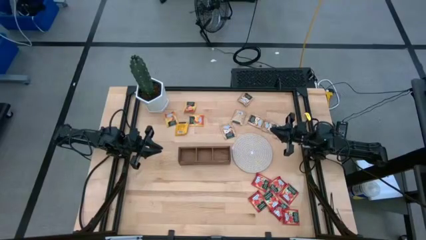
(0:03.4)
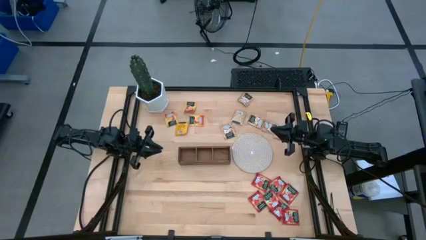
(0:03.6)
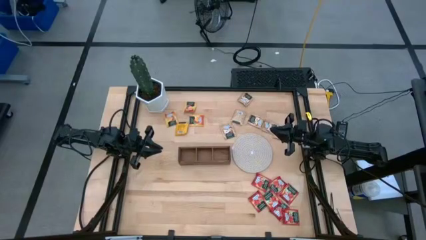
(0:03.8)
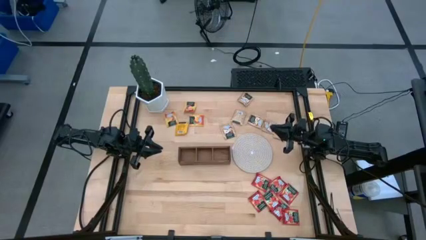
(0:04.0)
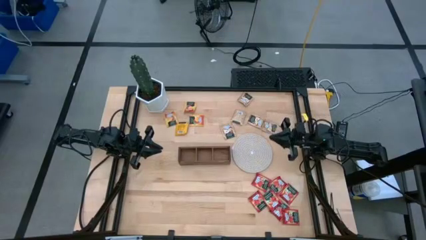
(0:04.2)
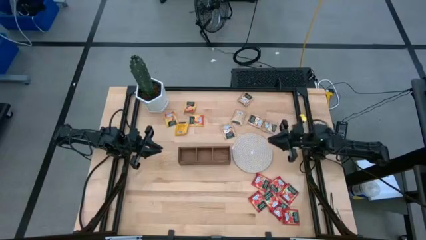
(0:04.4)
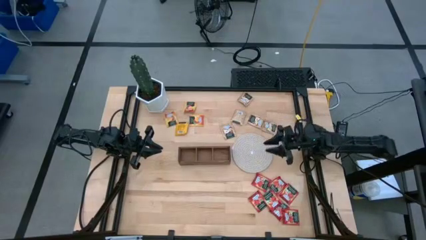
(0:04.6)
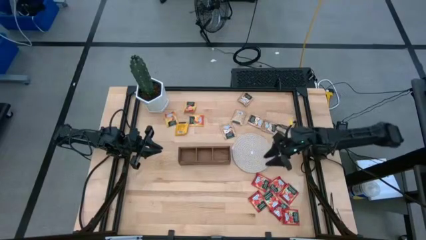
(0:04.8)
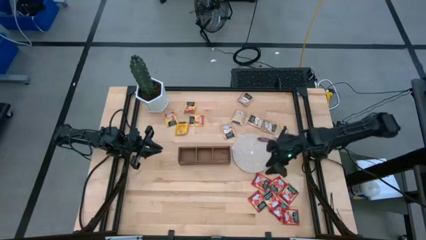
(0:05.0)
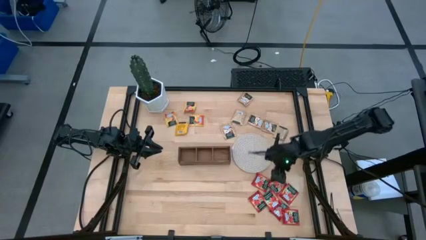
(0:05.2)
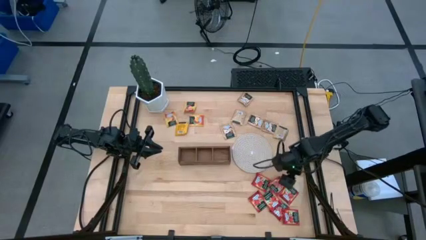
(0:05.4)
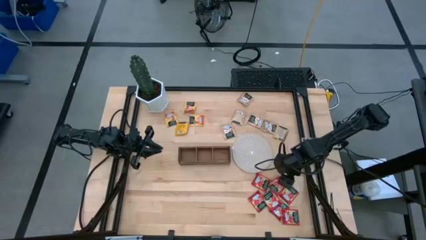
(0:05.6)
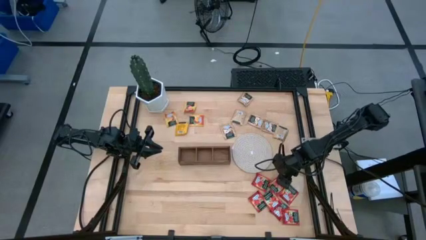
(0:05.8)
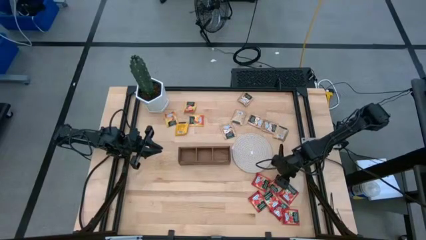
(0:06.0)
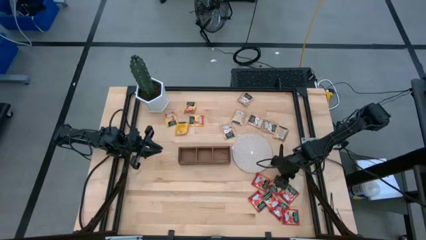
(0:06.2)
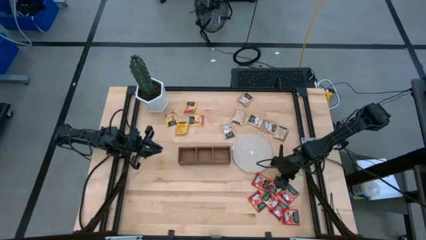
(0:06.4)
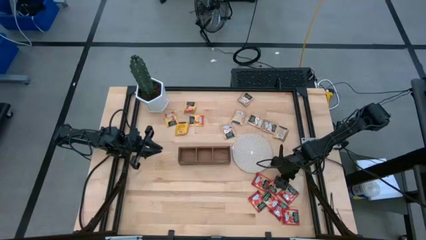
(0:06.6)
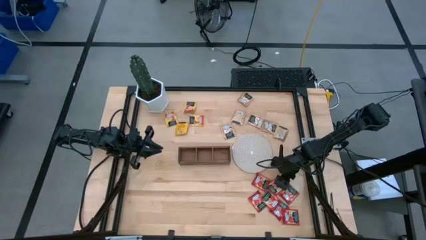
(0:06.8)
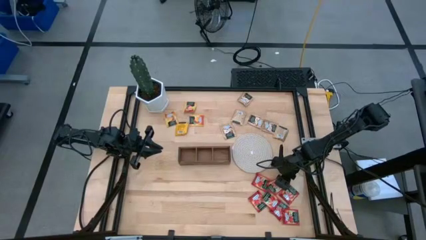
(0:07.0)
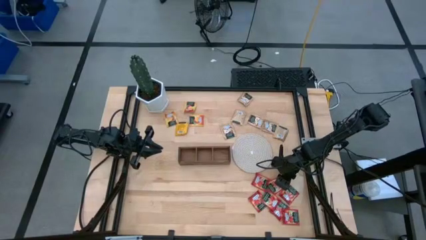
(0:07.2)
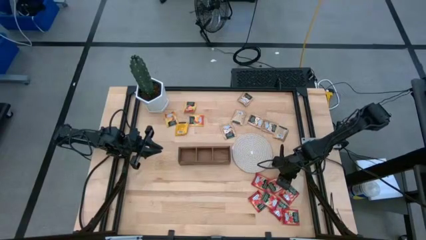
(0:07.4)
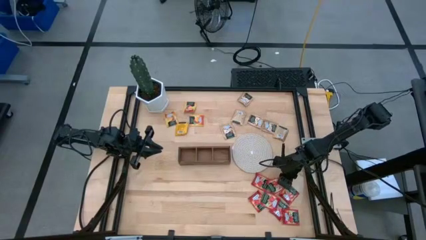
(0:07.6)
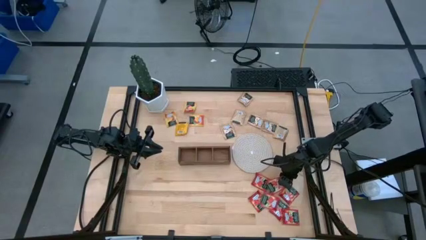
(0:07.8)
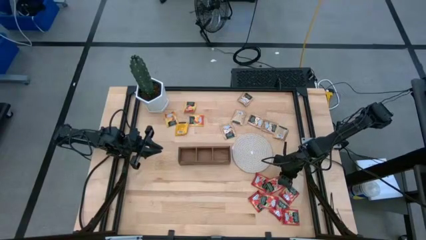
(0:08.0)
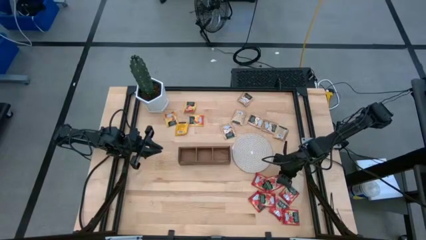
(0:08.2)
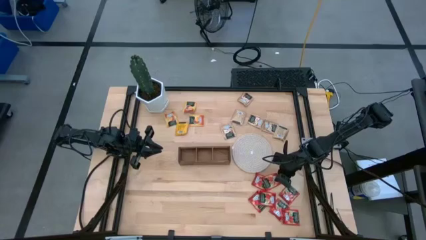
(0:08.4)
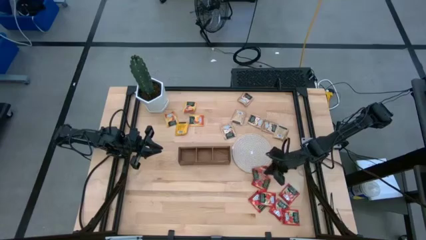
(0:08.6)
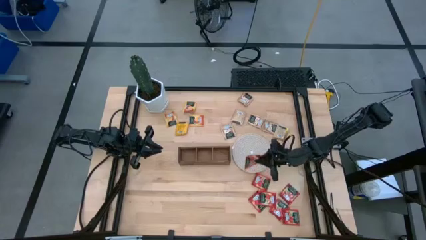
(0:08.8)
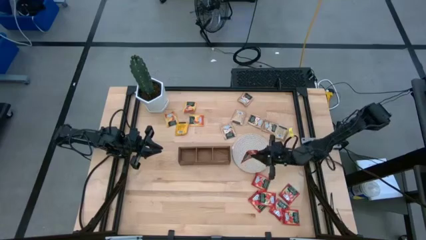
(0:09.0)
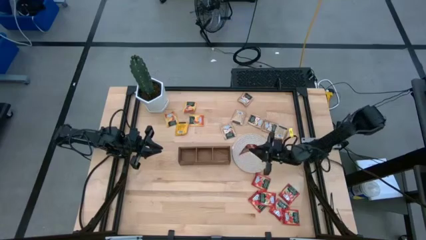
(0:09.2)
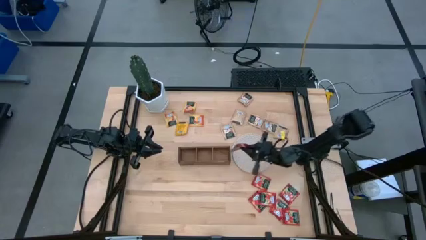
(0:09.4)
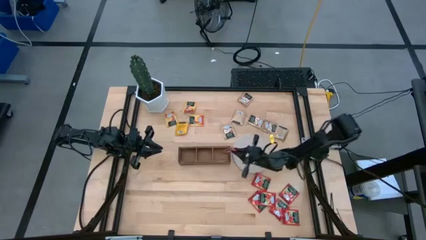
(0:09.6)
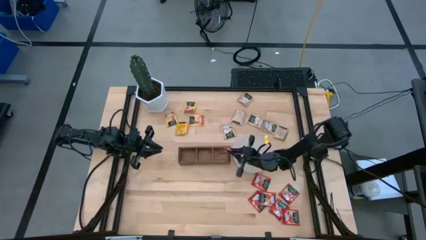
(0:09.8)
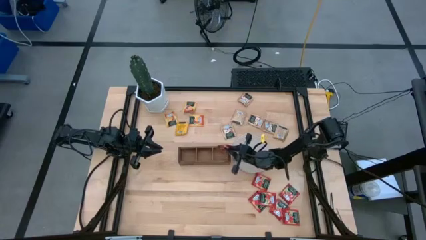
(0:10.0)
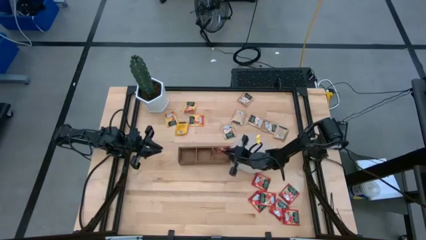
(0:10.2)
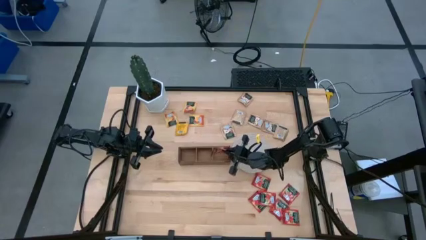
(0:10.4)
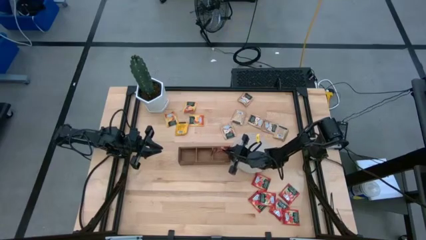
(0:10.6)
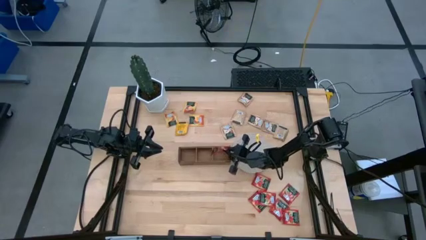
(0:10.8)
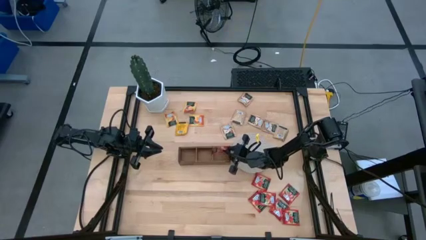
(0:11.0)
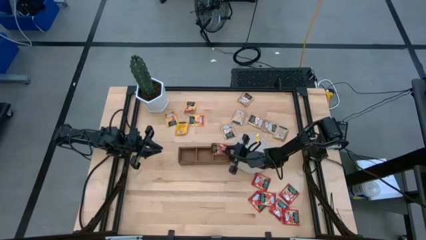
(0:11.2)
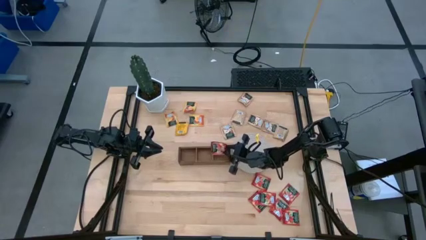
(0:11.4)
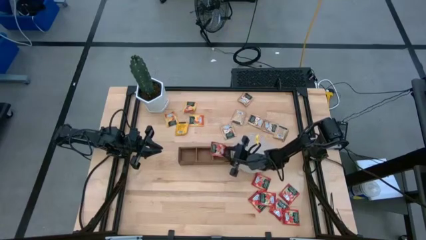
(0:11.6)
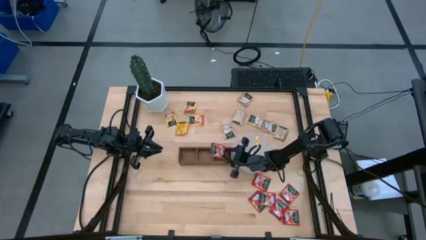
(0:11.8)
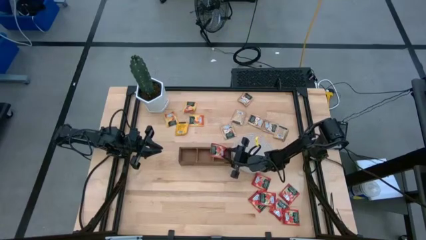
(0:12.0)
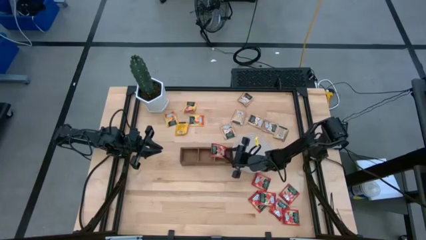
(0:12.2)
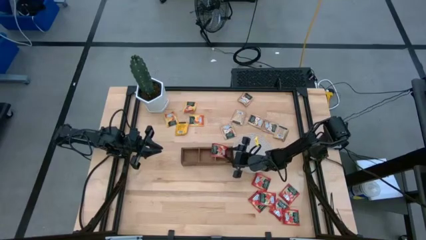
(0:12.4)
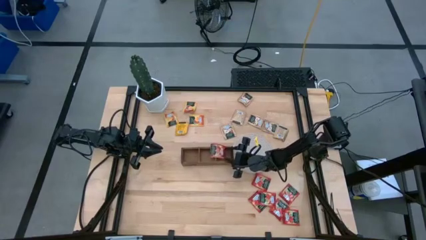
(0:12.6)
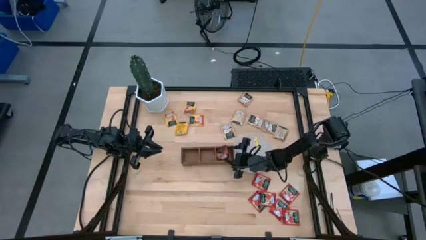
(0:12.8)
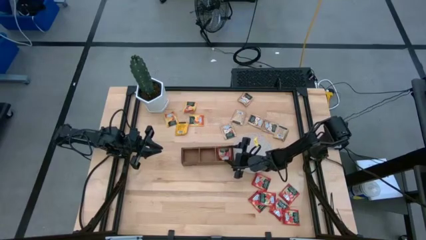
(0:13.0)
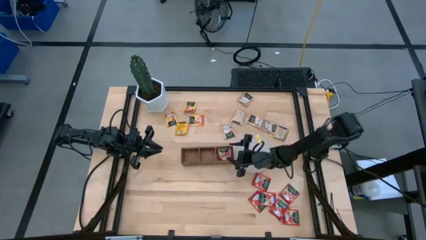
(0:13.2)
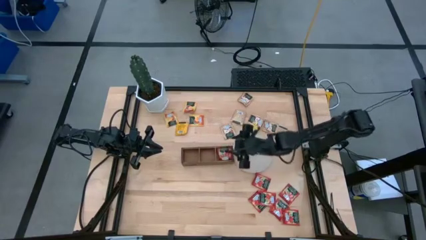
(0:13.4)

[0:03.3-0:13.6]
Task: Pick & Place Tea
Put the red tea bag into the right section of the wooden organizer

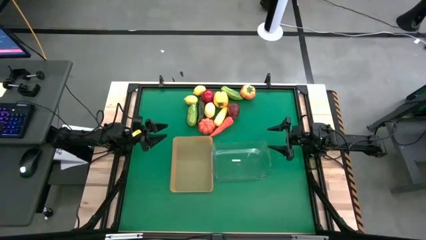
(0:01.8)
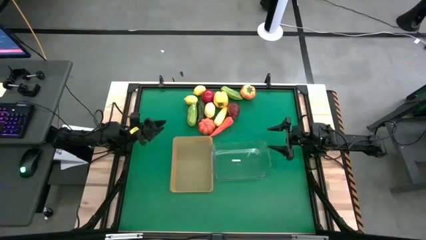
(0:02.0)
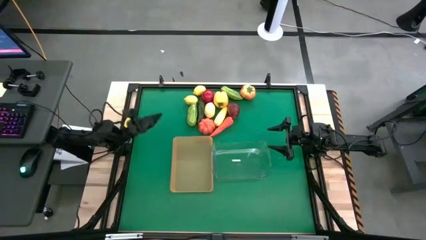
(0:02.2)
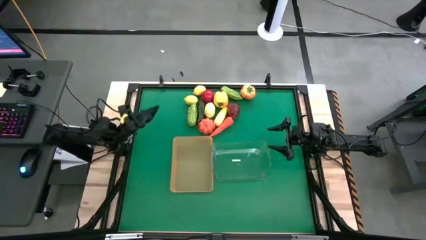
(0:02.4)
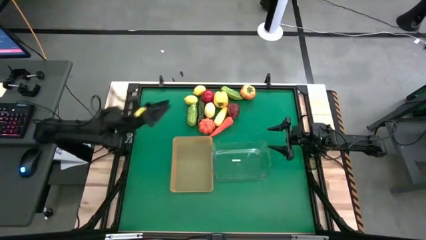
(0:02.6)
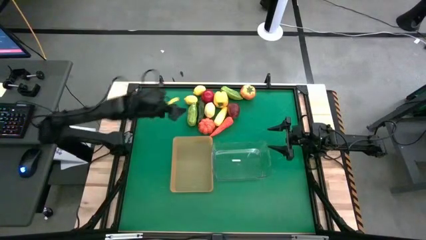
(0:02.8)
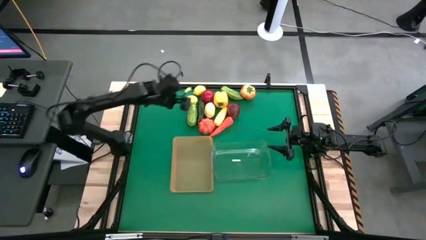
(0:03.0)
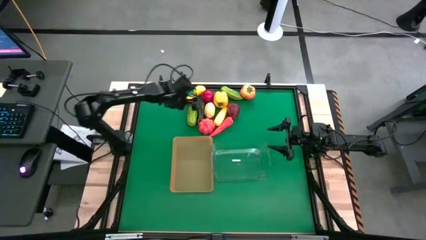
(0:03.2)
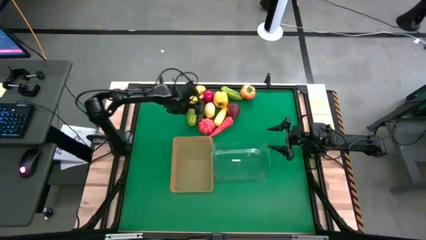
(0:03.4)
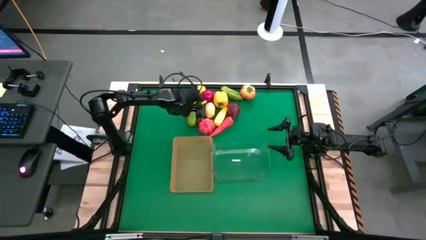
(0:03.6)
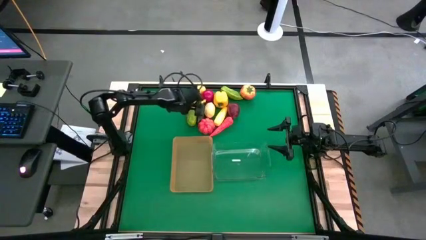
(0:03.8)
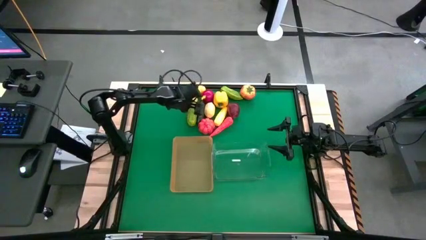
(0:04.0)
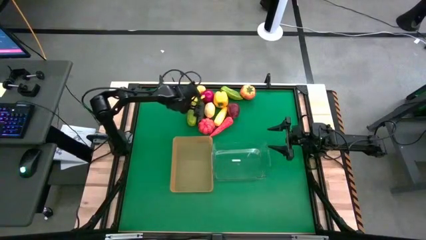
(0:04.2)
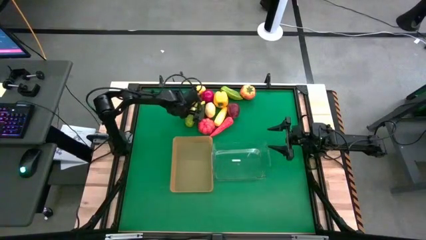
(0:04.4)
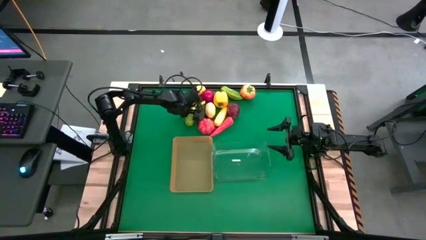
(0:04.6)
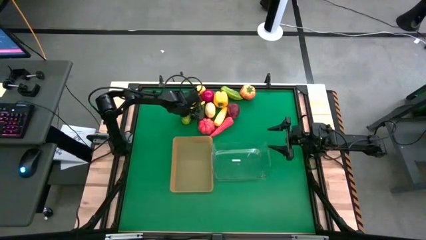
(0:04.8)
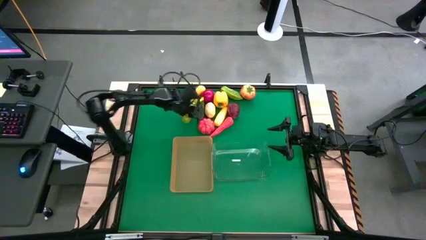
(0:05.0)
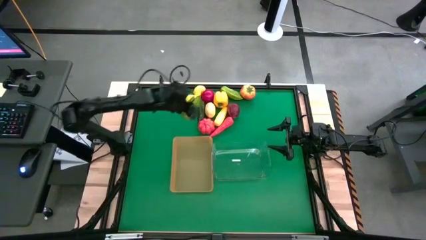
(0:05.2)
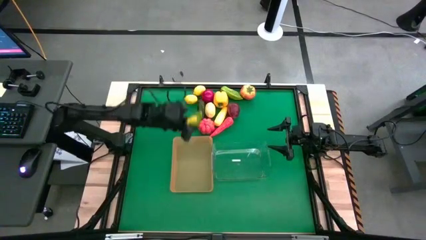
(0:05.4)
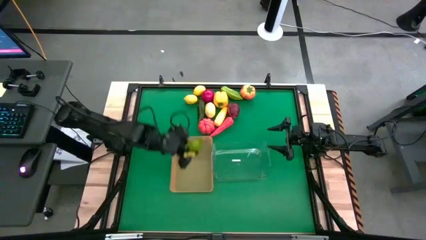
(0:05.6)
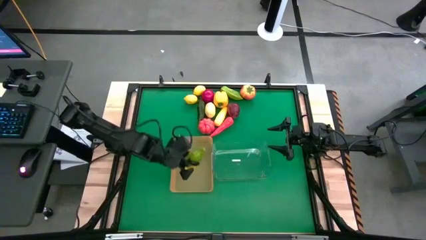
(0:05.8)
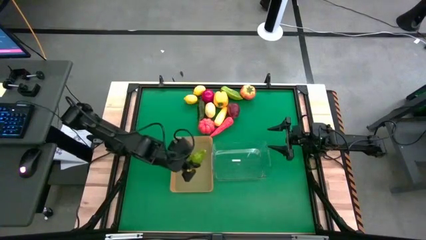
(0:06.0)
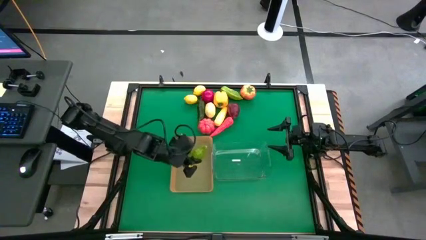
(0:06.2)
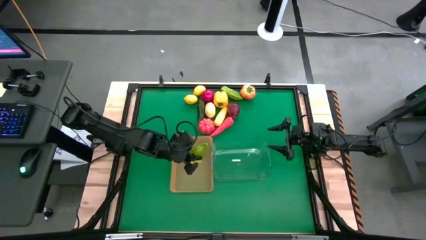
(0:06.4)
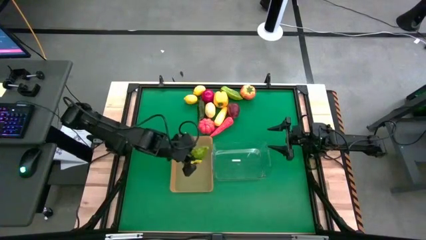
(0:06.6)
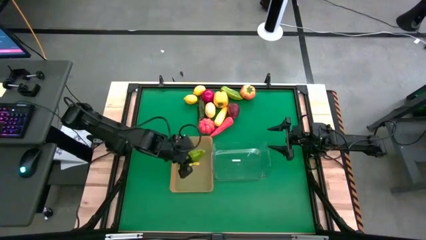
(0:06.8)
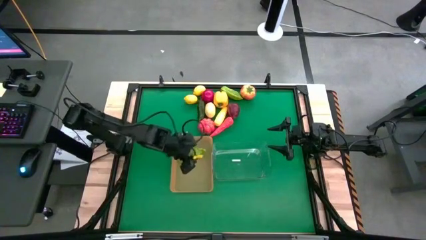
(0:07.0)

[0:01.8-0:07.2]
Task: Sort produce into baskets
Put the bottom cucumber into the orange bin

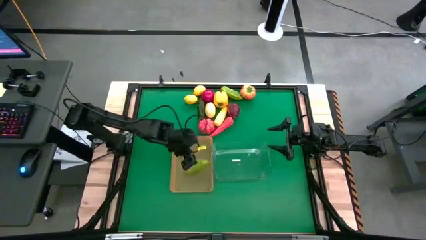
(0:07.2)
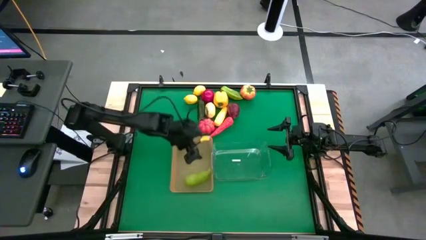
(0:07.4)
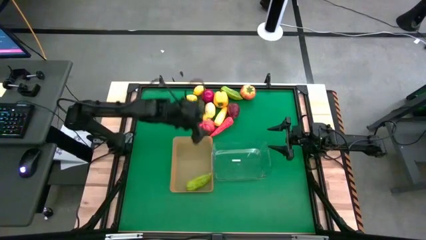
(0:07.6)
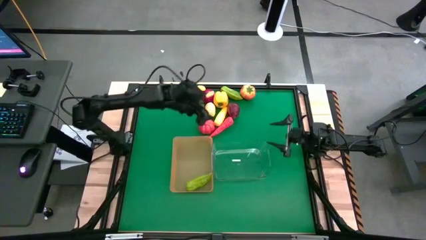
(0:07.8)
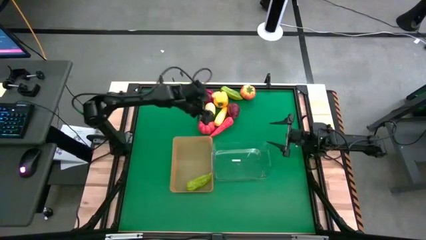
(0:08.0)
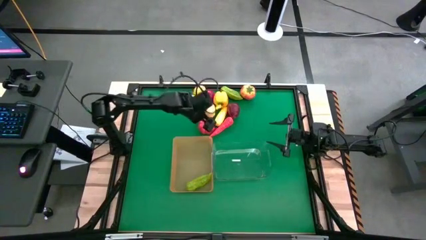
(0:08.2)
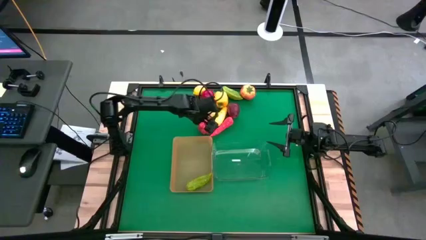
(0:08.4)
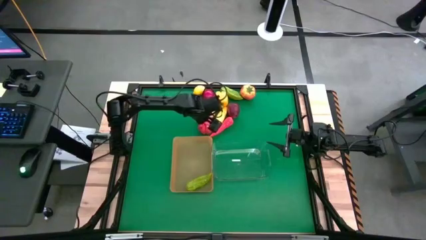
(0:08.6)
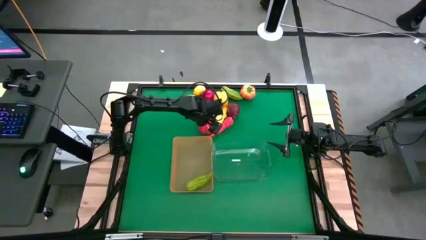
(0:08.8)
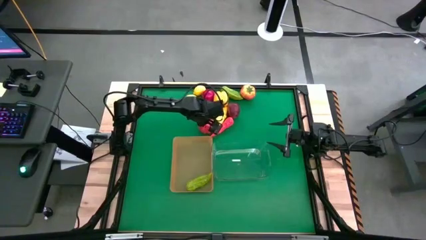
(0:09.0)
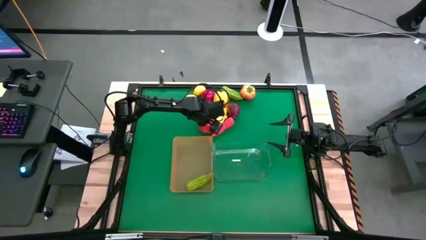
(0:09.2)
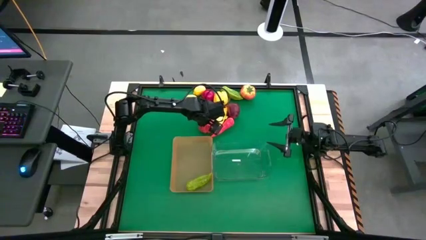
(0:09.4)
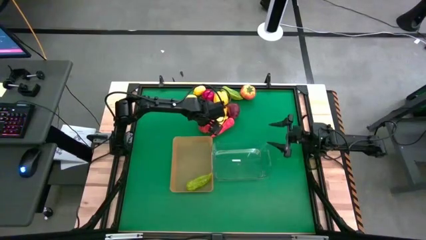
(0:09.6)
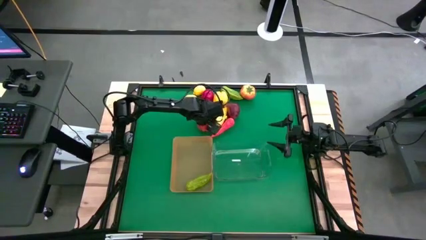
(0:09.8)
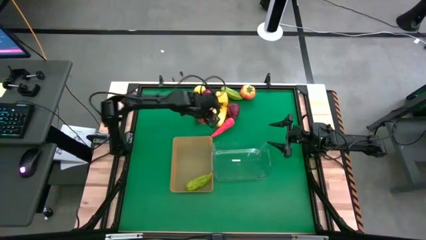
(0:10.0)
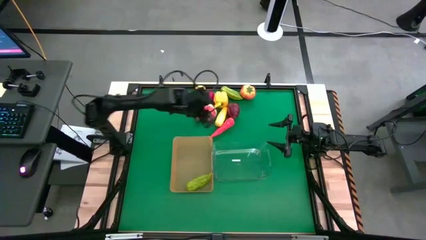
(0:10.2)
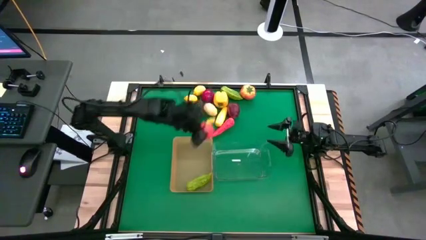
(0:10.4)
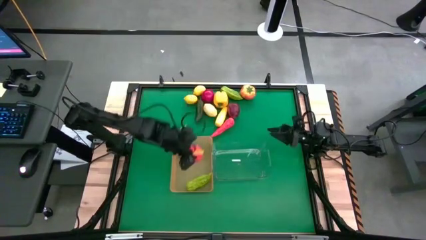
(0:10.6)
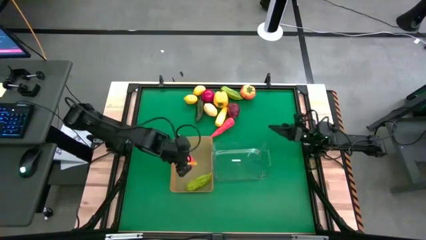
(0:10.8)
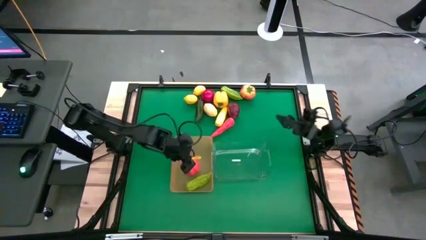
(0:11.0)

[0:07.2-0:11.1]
Put the red bell pepper into the orange bin
